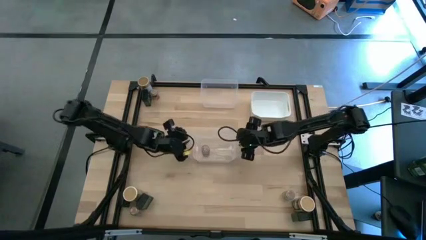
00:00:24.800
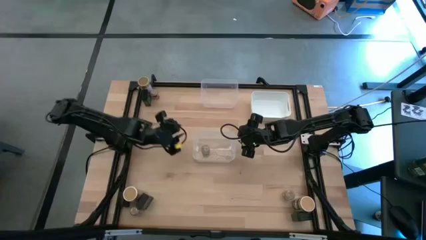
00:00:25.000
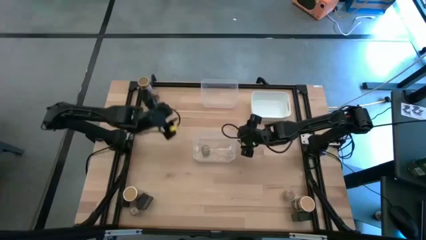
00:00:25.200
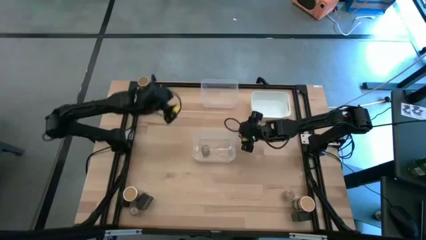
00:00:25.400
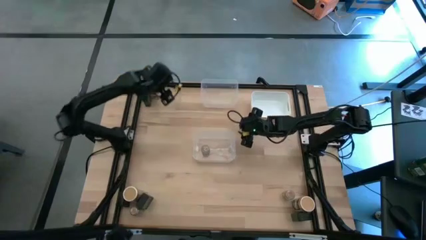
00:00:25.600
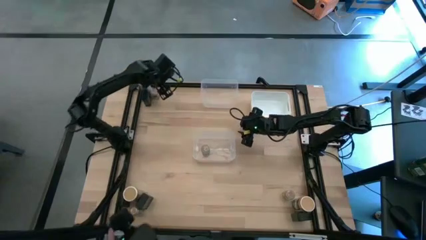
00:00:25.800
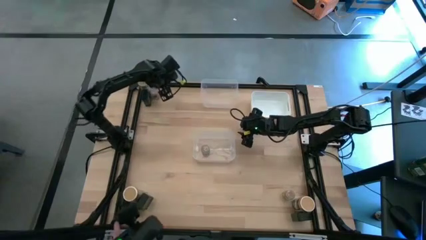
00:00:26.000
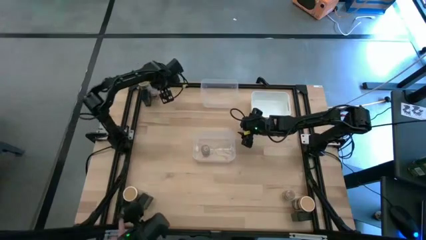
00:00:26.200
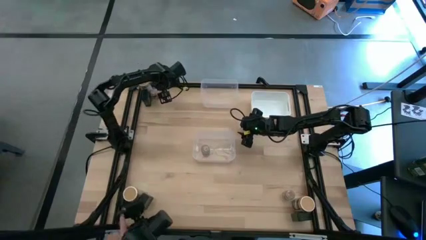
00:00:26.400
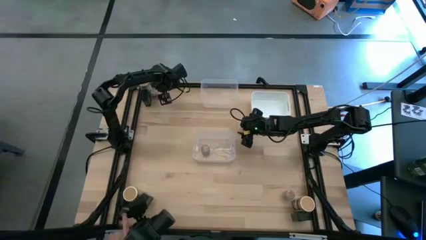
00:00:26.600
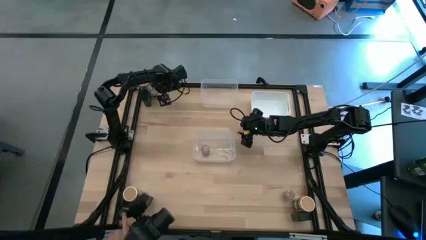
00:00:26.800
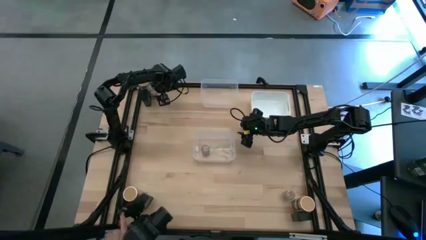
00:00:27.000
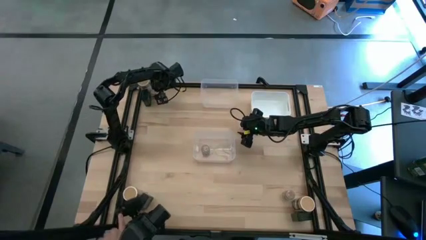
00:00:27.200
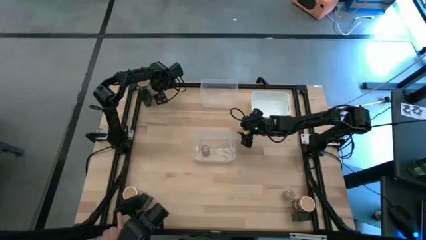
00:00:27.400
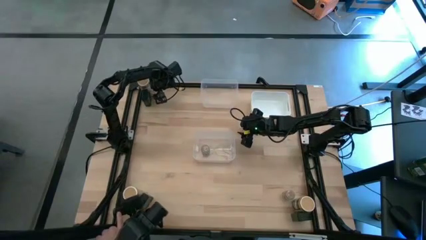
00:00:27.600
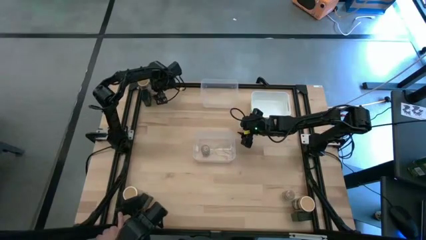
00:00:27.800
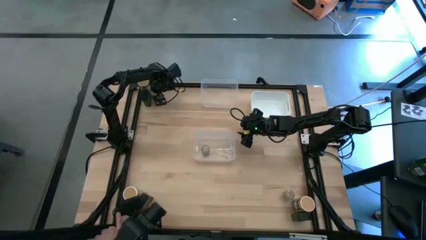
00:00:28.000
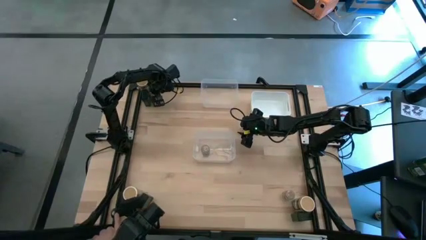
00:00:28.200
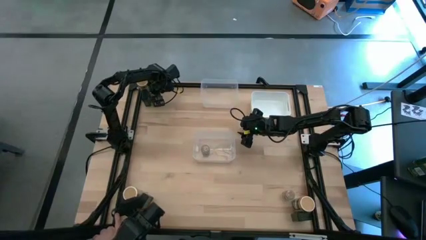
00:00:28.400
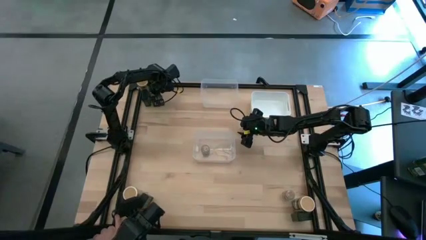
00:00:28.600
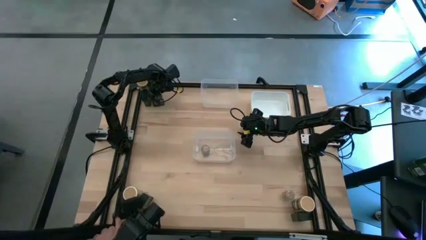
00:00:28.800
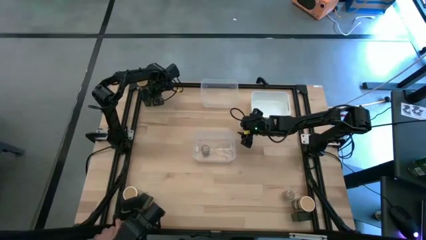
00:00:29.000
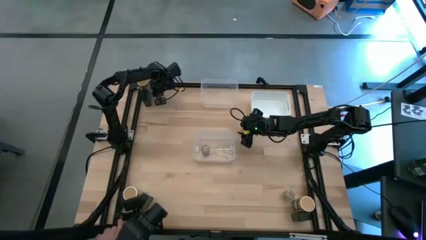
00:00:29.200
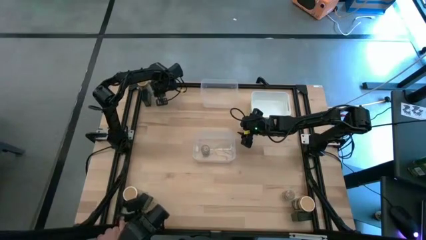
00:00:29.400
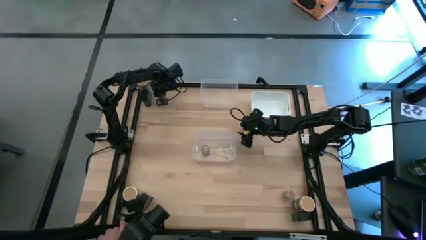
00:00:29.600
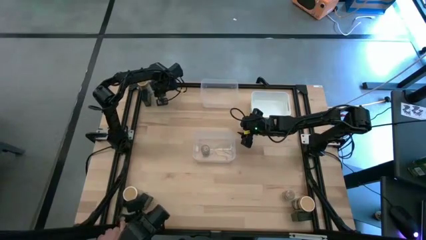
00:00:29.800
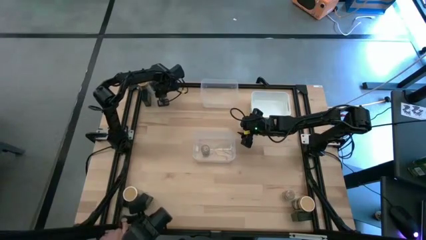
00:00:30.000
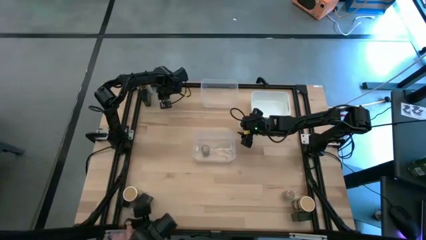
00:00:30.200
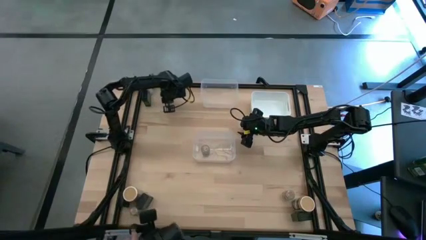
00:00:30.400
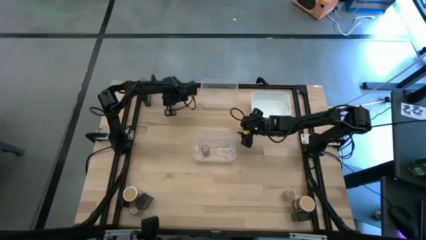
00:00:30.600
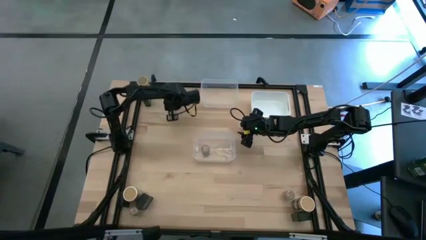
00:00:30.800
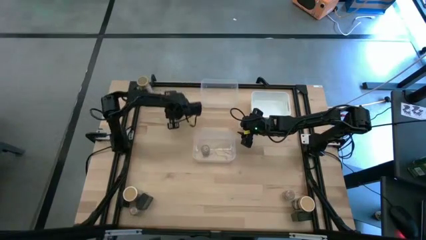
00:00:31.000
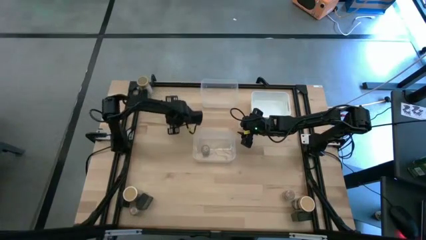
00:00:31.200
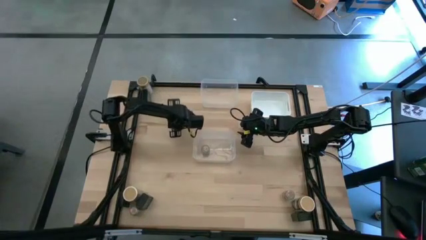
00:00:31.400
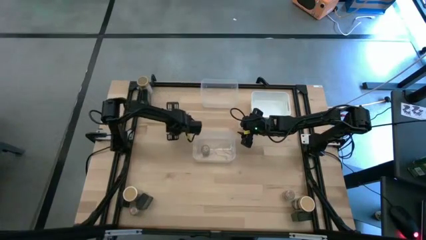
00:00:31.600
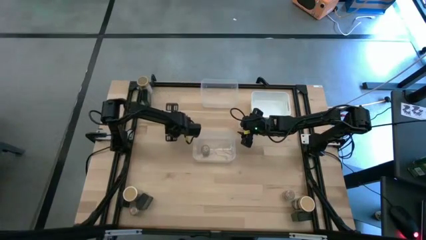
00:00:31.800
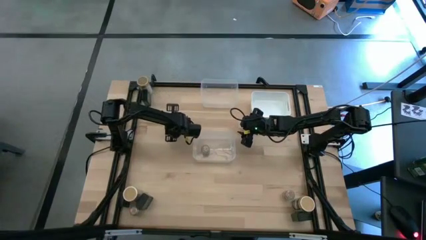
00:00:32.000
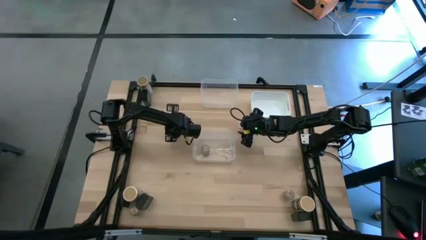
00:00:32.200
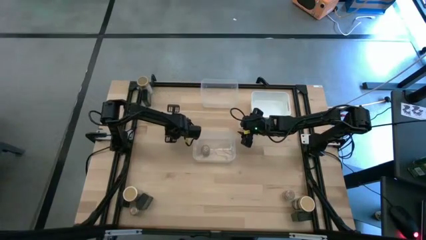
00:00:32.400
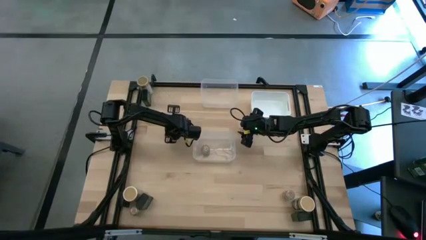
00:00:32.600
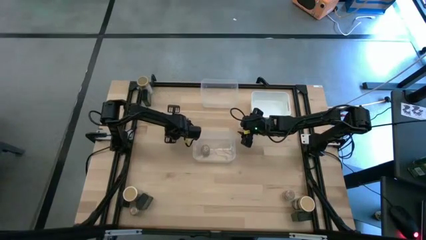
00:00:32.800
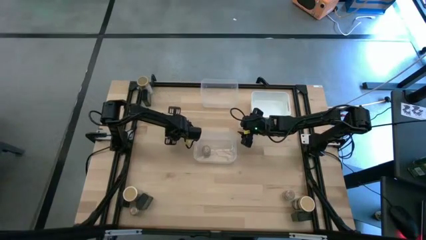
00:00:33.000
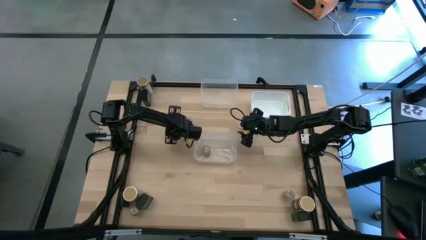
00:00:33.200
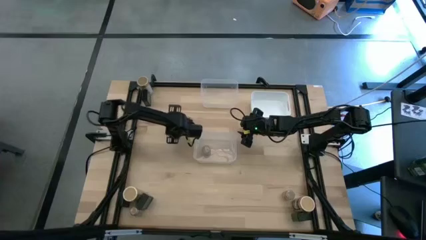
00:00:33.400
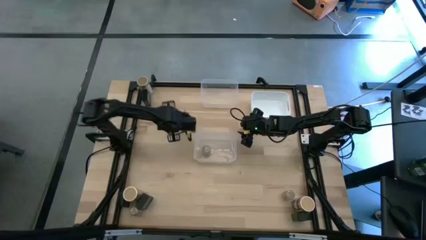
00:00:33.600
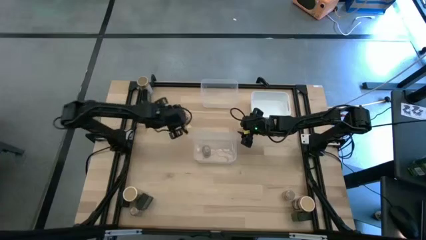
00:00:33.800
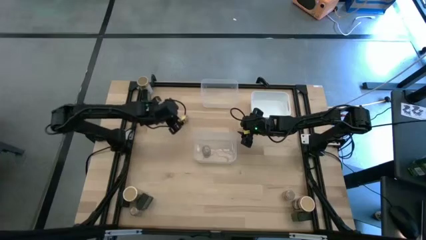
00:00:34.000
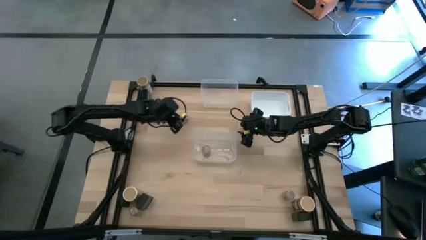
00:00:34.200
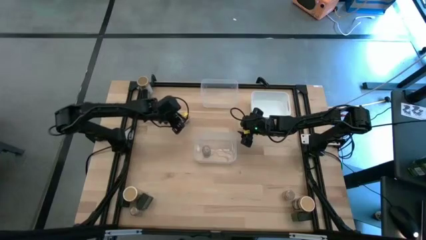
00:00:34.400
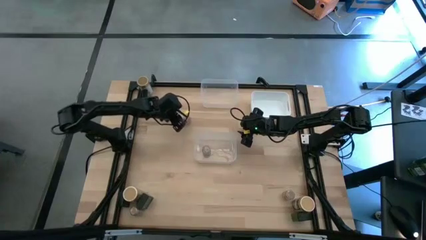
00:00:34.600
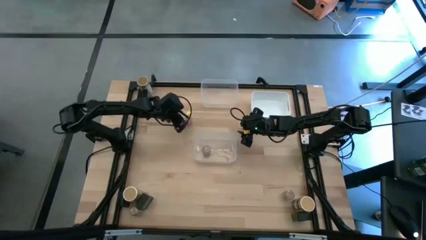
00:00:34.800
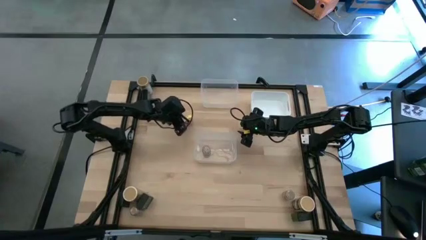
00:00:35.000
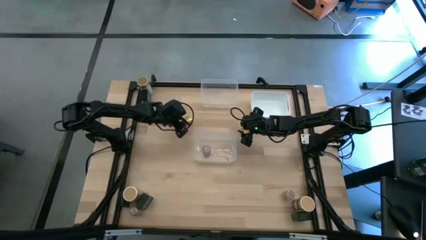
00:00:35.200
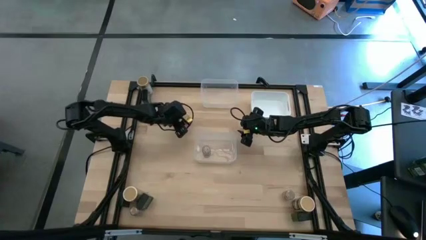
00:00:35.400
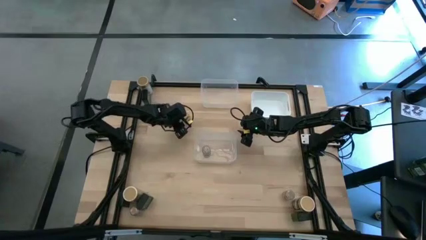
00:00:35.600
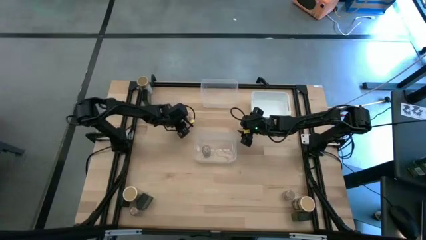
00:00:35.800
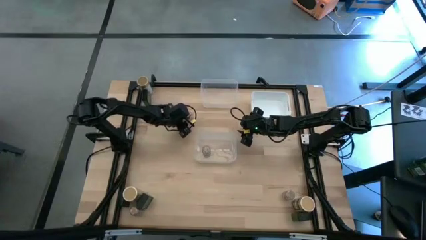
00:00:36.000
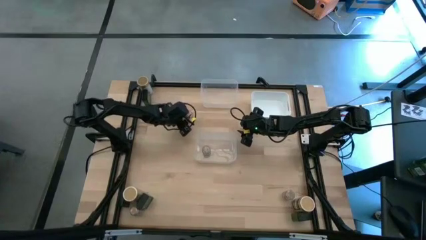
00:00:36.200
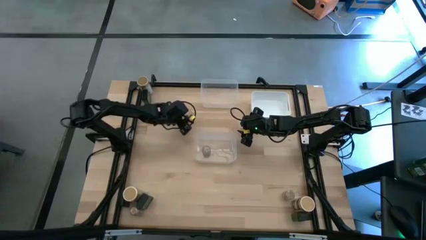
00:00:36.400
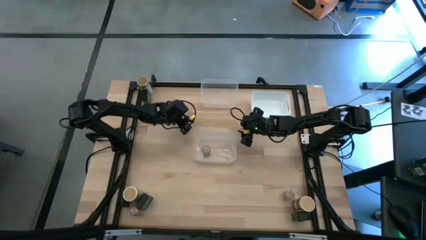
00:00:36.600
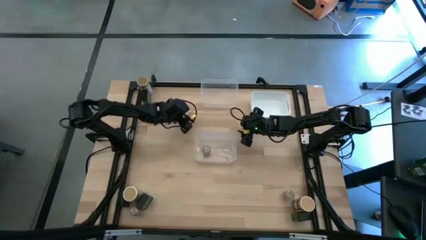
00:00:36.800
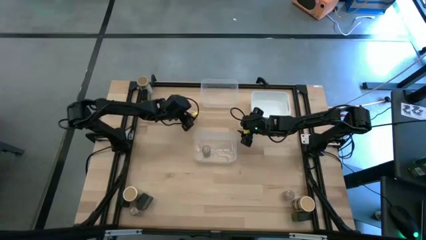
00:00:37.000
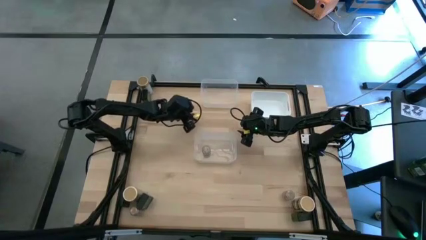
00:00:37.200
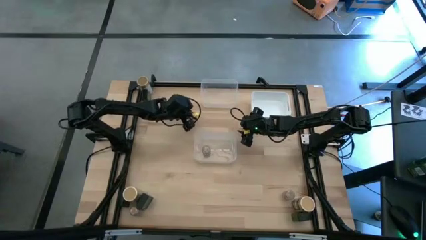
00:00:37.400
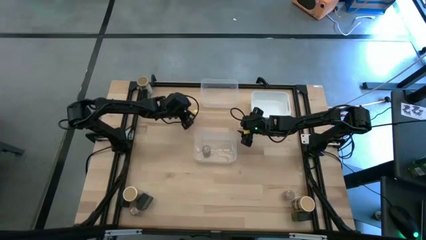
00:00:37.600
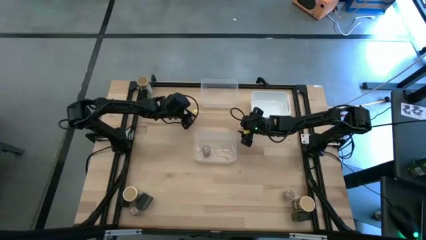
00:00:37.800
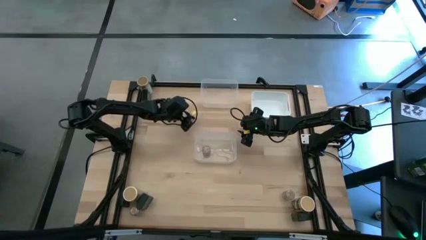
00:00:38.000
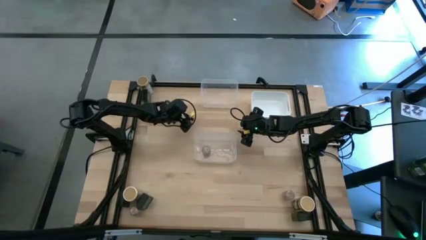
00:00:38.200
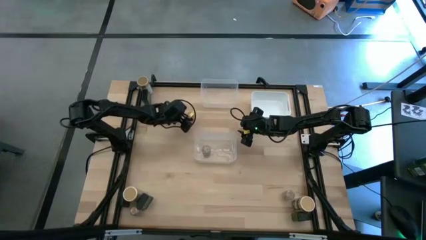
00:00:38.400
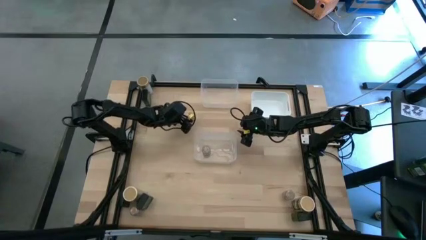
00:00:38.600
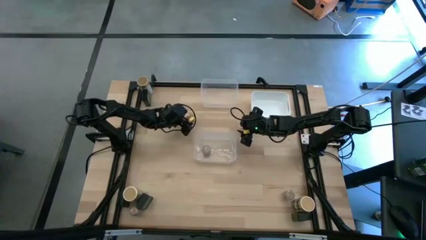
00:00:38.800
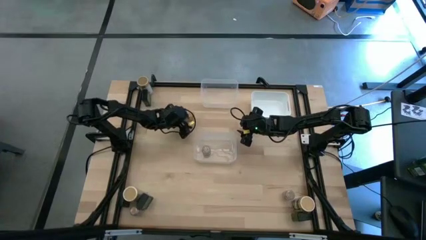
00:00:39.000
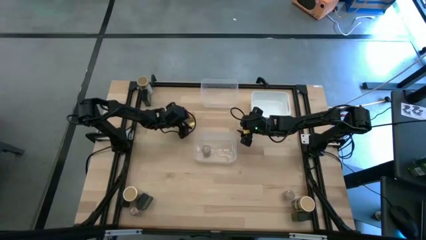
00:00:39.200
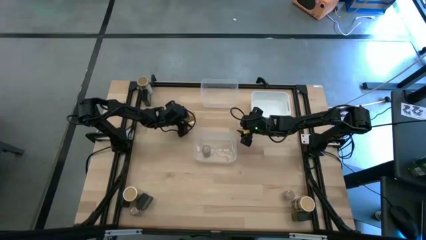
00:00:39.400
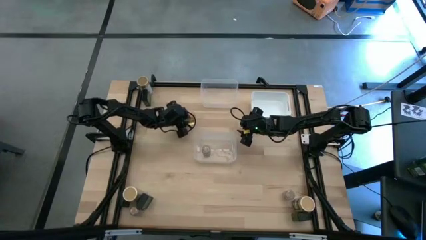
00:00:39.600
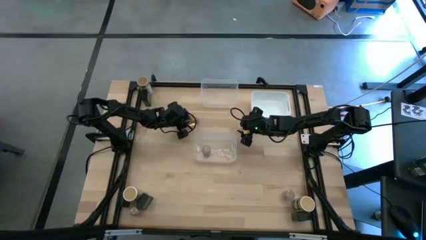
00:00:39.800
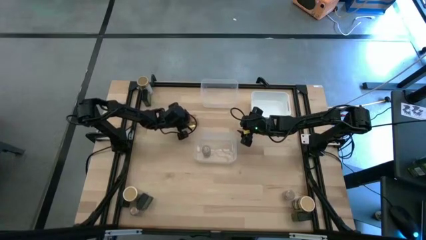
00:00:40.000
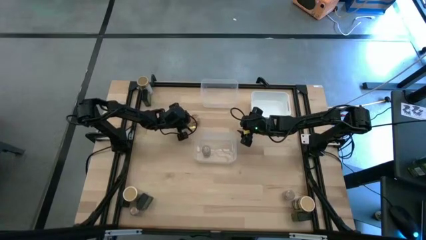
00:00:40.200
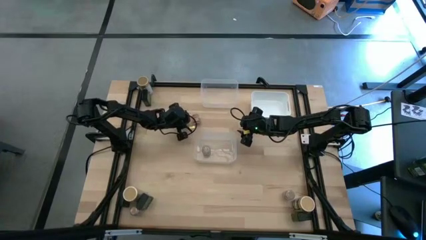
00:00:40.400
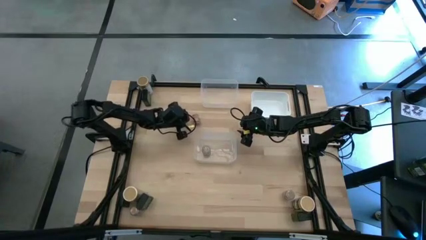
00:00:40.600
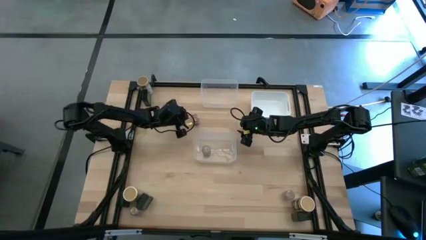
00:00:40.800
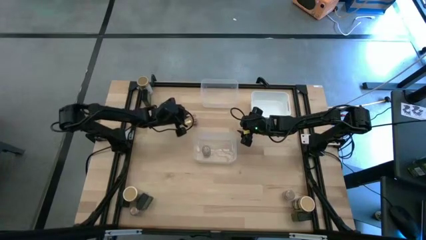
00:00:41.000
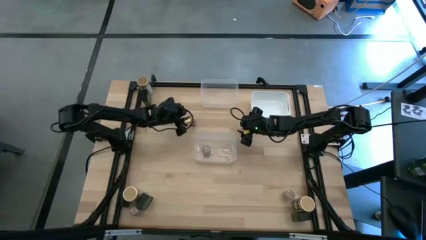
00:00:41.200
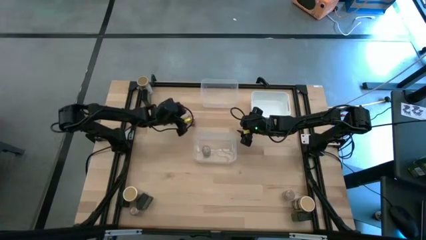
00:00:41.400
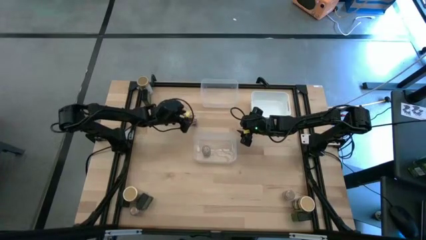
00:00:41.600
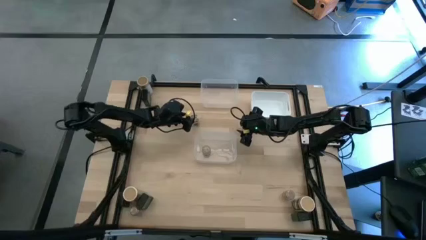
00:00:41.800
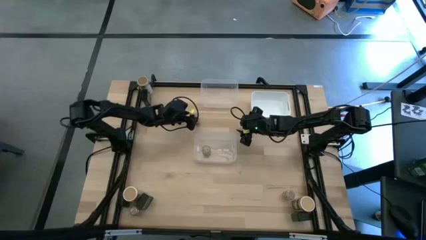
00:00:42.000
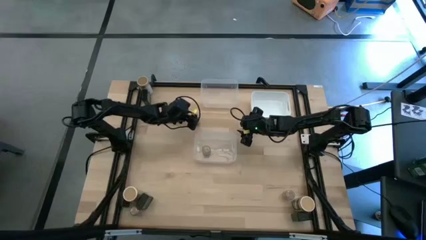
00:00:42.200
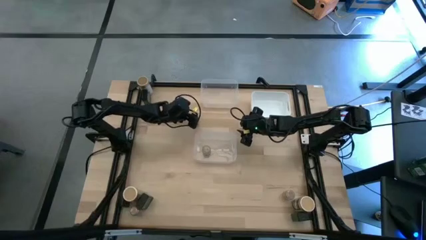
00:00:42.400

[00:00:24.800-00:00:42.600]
Task: Sort spices by type
Put the top left transparent seasoning bottle into the bottom transparent bin
